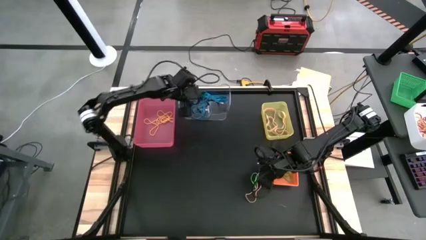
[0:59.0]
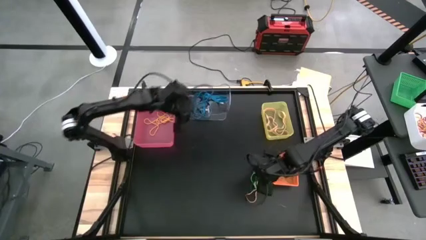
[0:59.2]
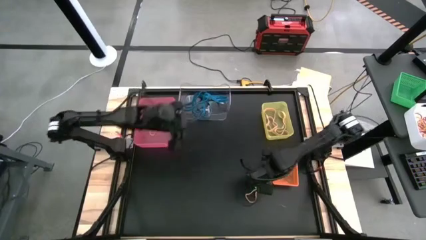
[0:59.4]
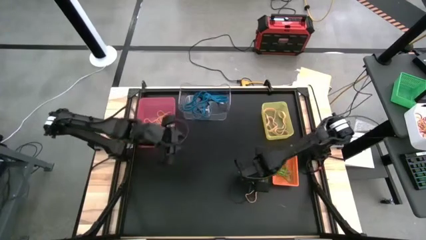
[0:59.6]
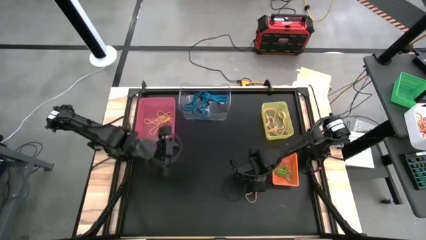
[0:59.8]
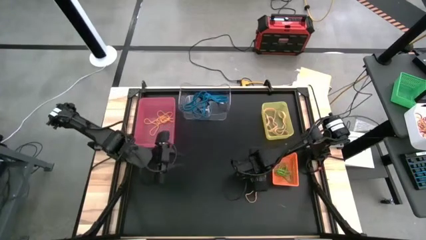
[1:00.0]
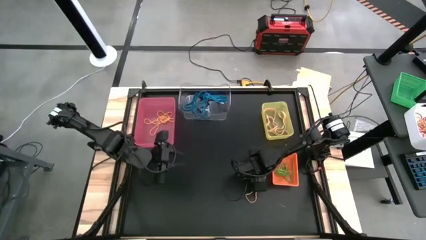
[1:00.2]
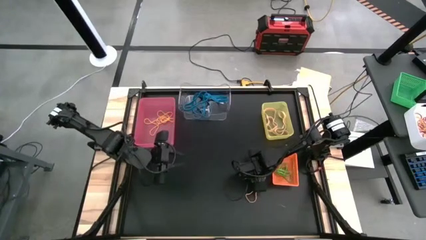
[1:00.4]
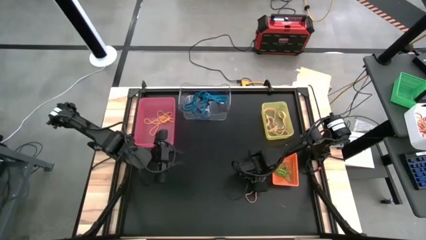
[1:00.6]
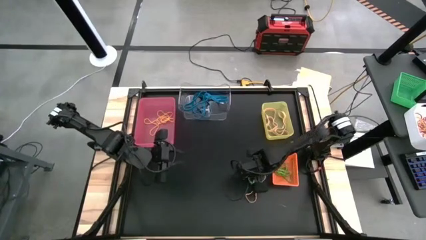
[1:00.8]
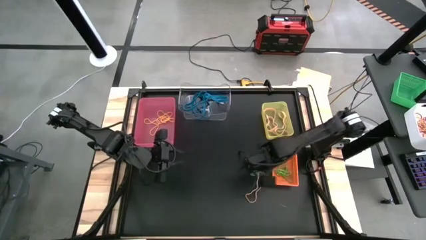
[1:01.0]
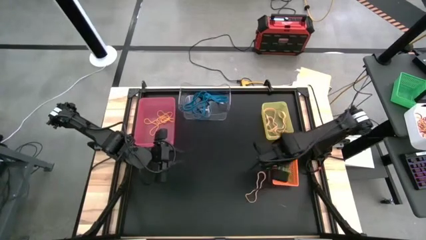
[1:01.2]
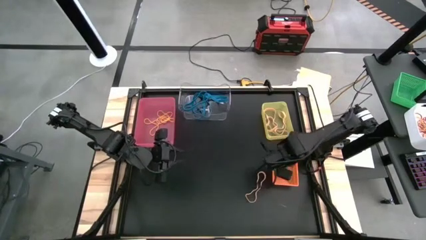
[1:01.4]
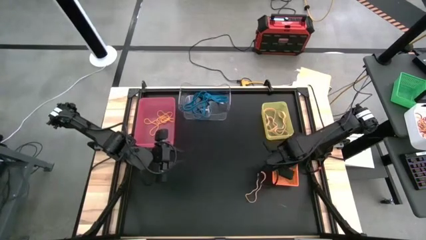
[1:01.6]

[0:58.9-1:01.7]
Task: Sort rubber bands into baskets
Put the green rubber band into the orange bin

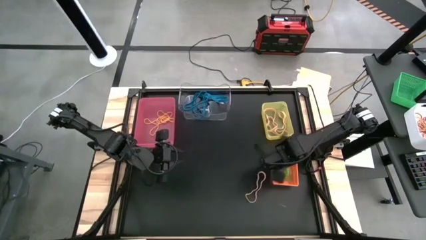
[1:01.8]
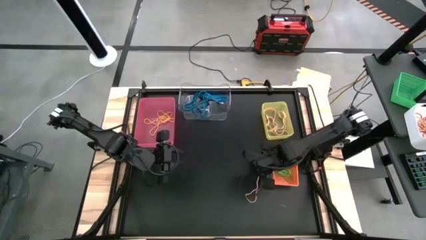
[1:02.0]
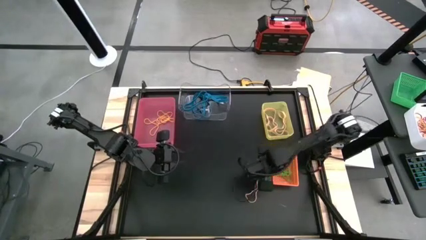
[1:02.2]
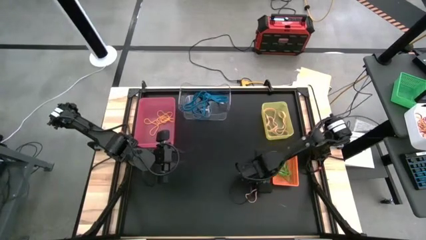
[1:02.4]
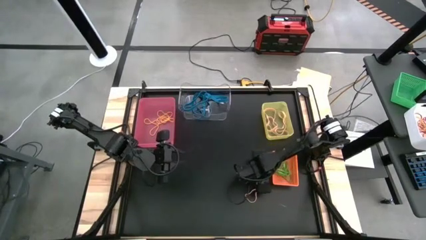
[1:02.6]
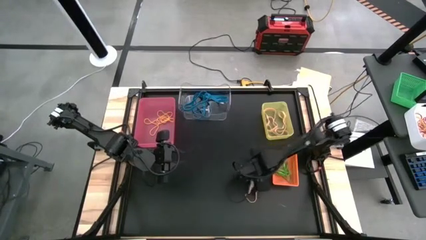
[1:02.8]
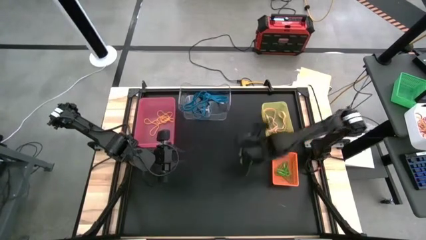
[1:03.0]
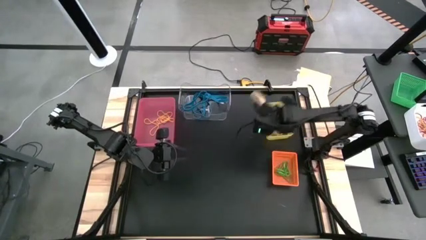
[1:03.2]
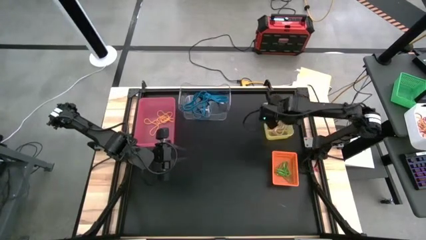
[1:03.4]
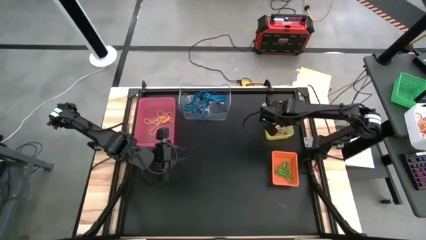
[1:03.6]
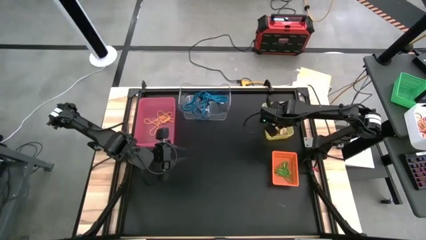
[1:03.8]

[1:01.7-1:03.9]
Put the light orange rubber band into the yellow bin

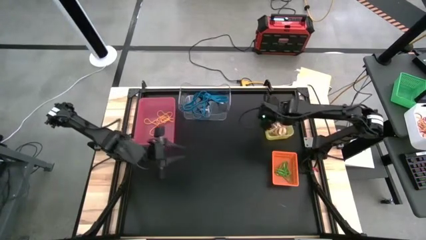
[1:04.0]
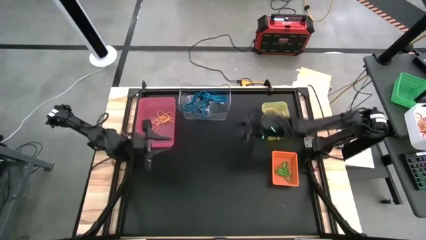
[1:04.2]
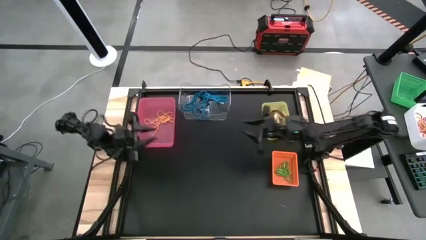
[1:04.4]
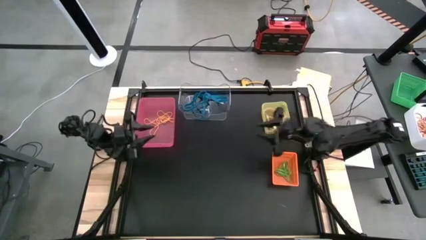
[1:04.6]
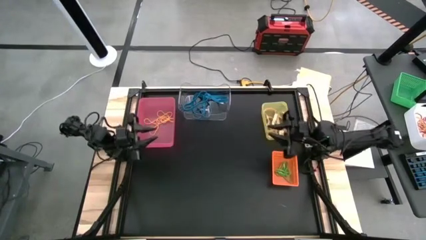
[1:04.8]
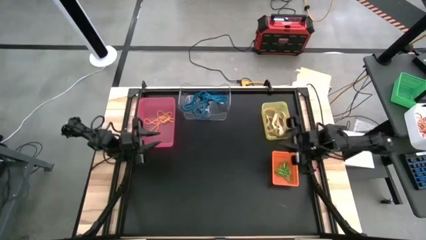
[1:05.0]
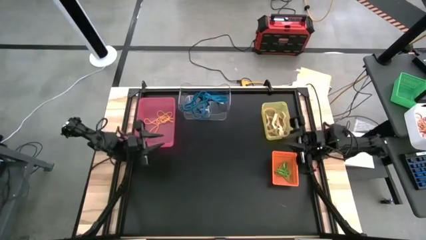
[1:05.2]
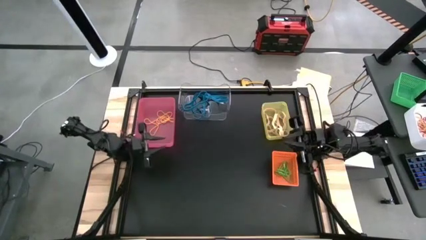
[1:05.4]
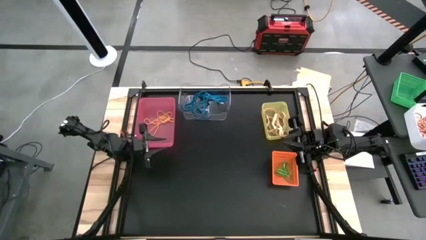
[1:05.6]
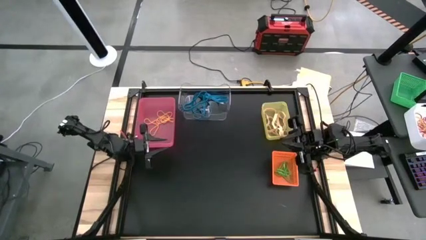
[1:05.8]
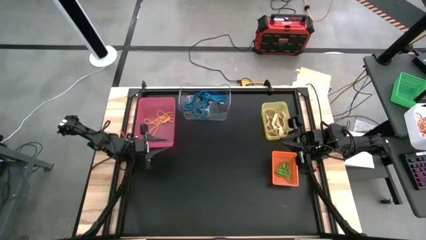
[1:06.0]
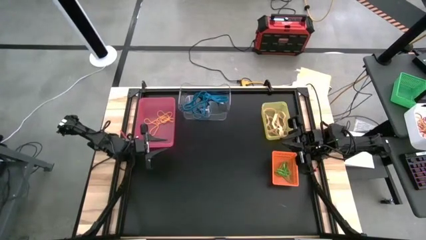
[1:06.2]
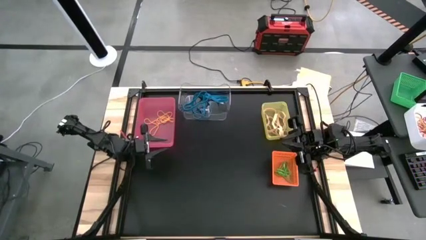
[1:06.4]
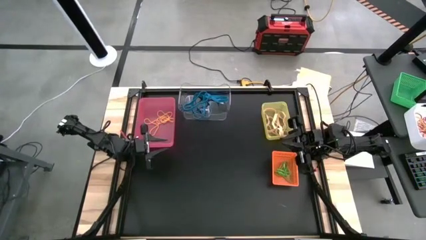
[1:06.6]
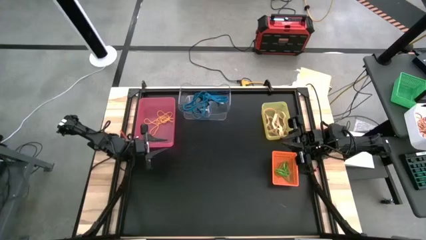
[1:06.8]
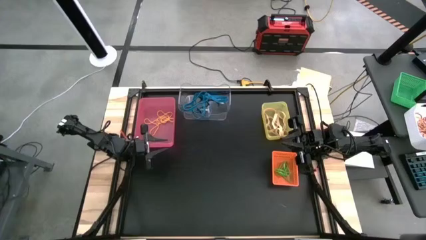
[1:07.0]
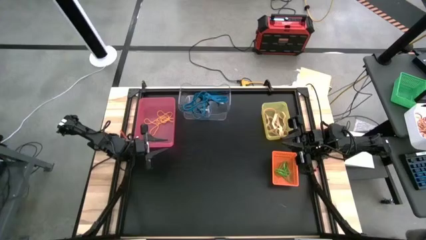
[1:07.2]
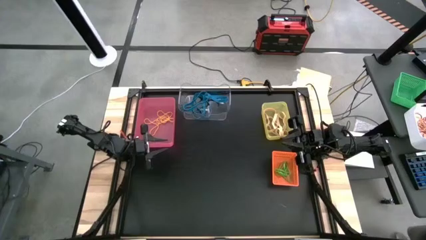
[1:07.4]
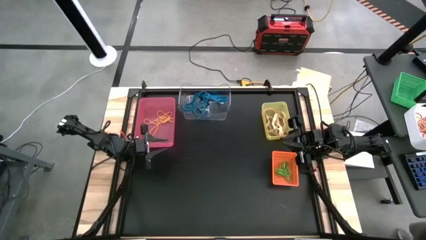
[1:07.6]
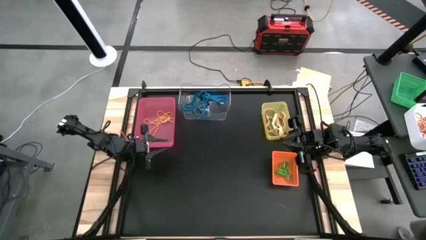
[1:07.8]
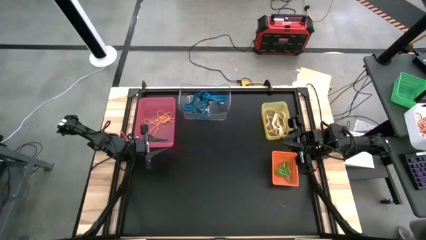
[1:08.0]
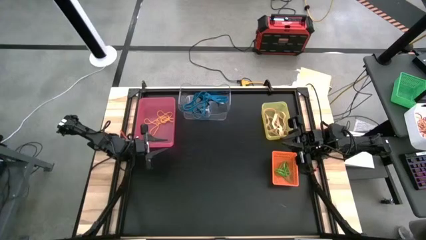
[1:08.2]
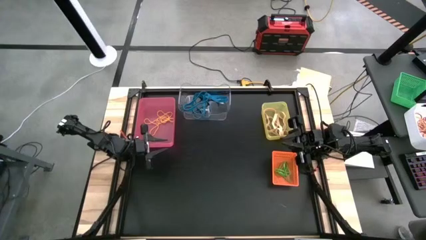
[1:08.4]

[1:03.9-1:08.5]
Return to Home Position

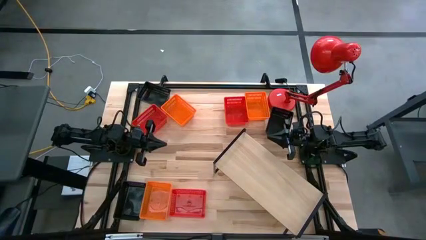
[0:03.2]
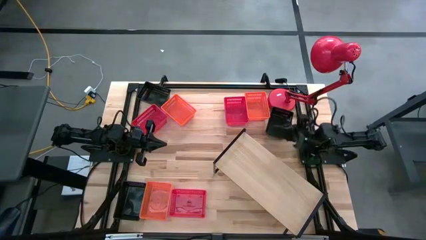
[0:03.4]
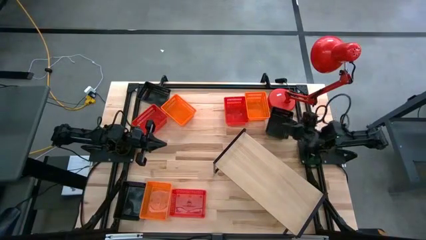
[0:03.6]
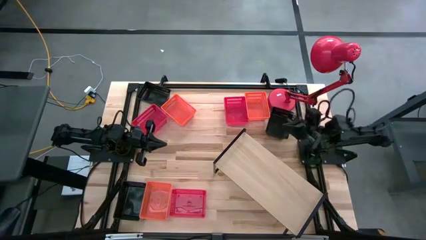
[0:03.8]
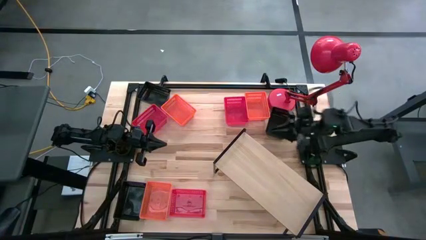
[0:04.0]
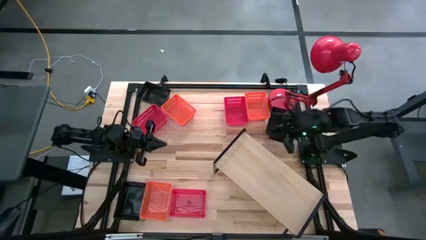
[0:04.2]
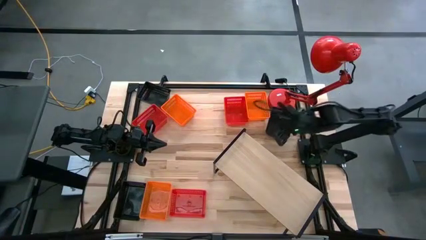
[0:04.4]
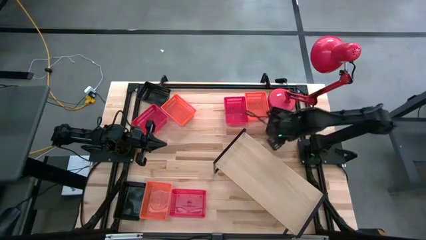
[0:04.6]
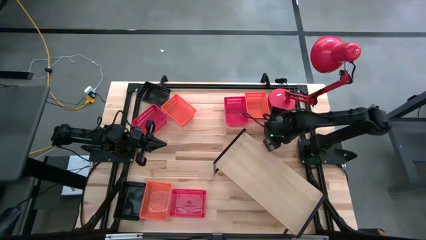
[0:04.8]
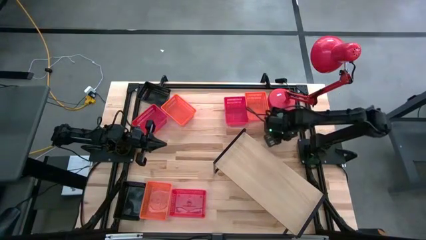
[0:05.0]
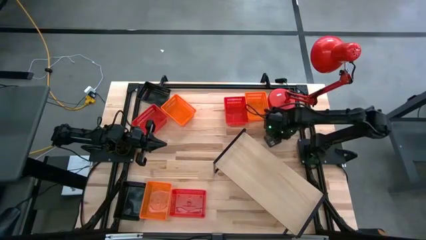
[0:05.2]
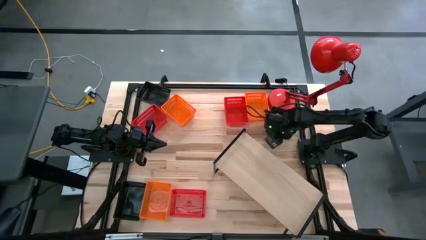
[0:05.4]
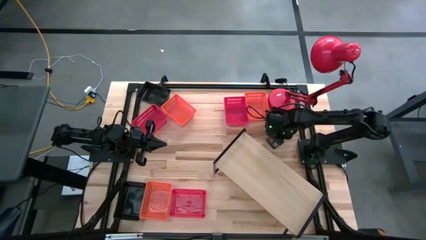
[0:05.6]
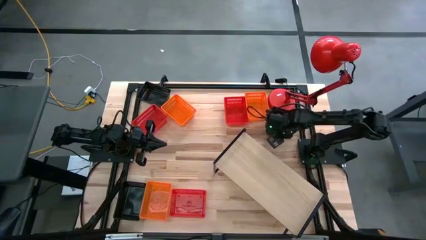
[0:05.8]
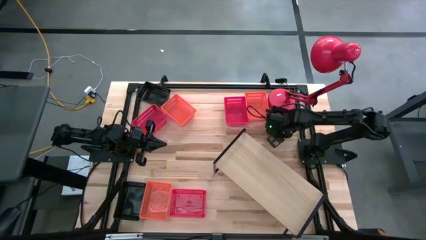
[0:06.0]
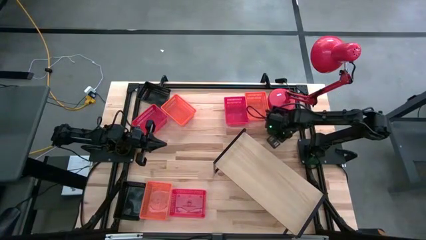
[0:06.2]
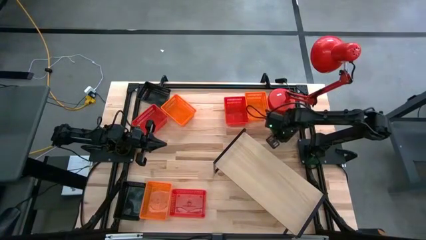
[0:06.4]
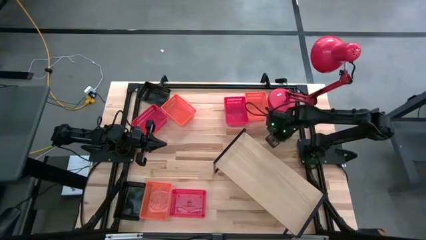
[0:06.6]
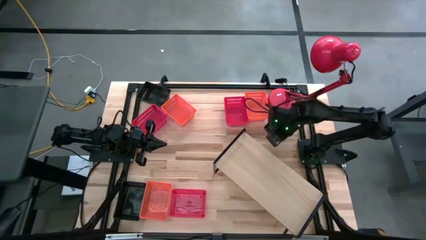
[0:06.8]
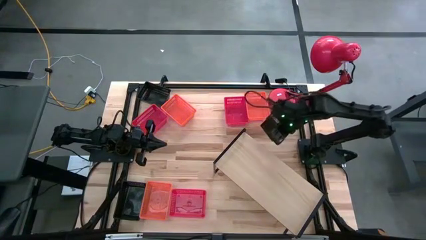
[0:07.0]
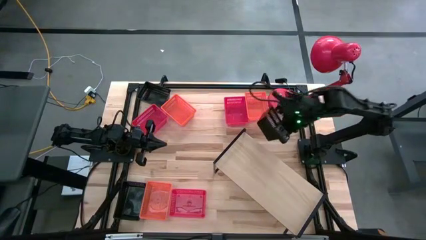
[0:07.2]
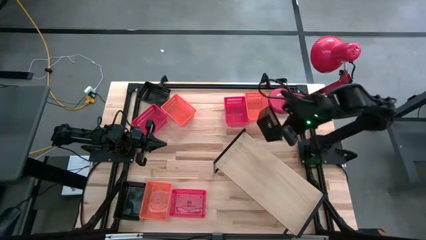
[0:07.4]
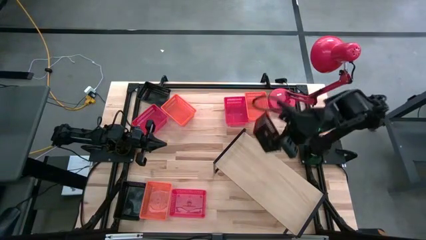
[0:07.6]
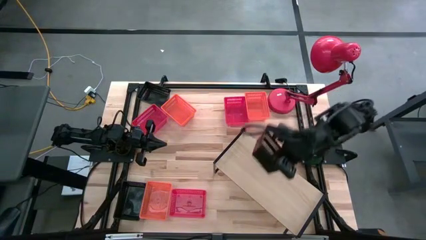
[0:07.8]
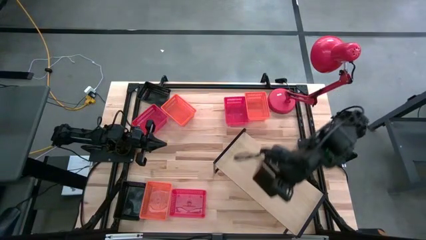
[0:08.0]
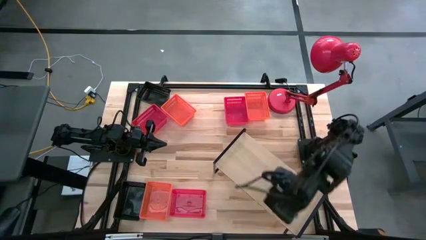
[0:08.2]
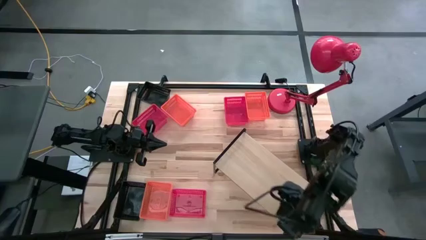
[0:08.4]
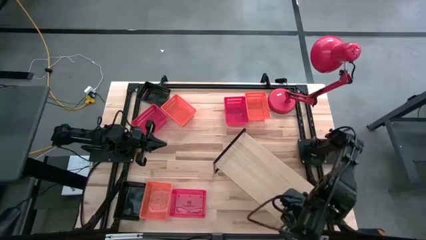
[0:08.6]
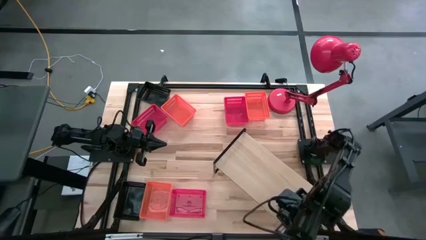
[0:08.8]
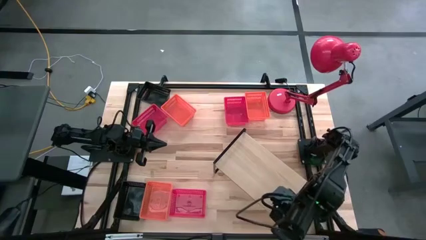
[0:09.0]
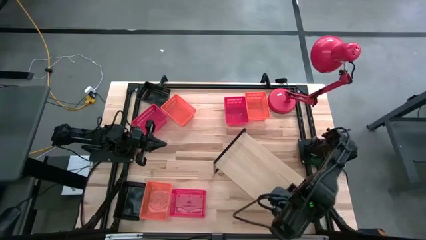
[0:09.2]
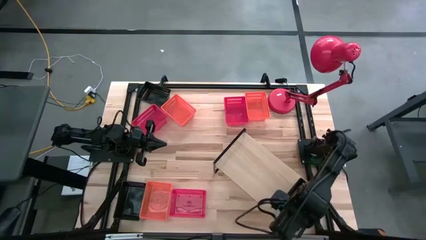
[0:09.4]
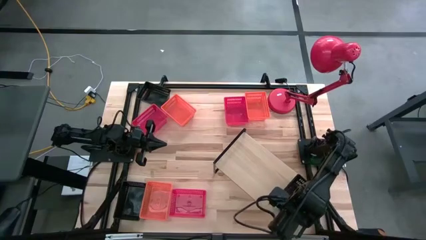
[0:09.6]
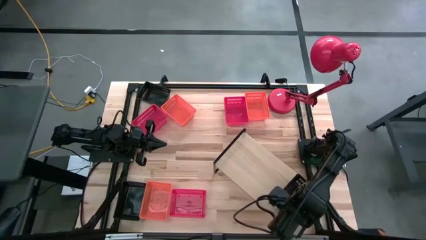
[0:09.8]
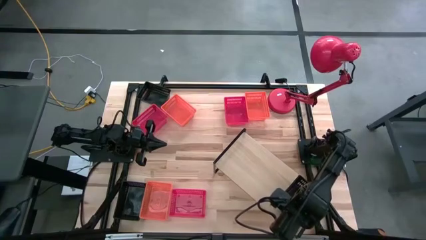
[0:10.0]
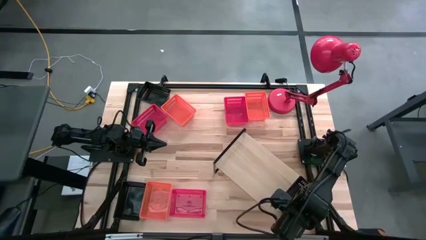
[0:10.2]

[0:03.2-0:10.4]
Task: Stack baskets on shelf by color
Put the top right black bin on the shelf
